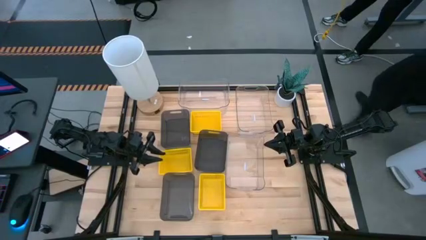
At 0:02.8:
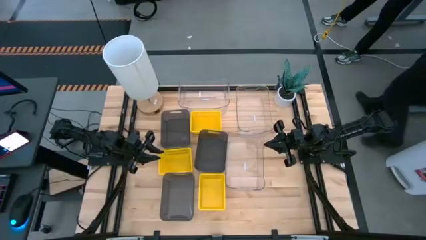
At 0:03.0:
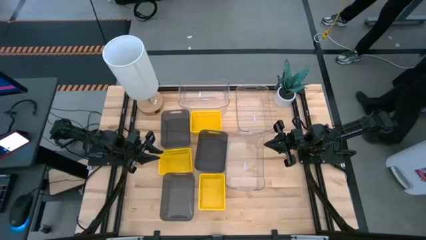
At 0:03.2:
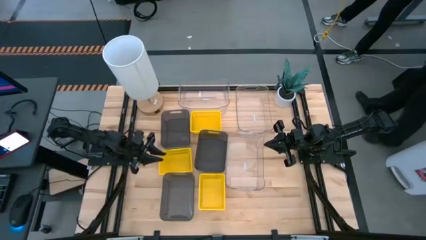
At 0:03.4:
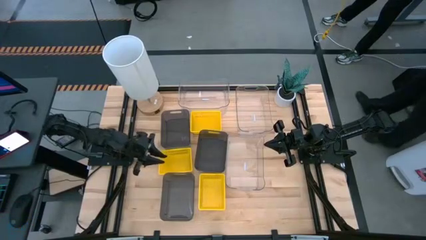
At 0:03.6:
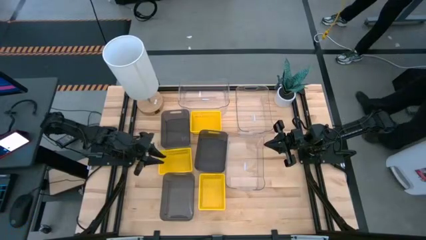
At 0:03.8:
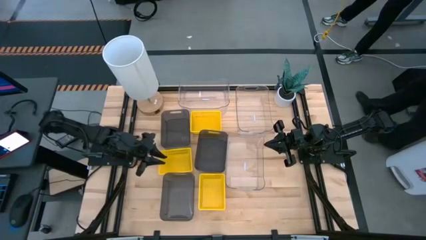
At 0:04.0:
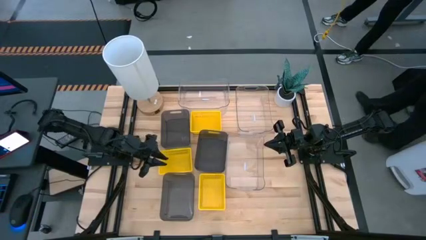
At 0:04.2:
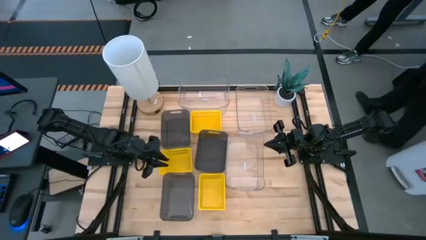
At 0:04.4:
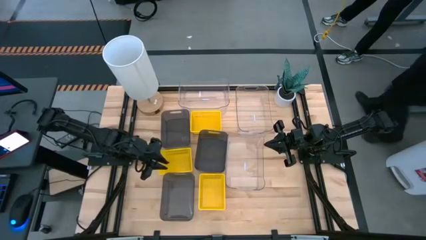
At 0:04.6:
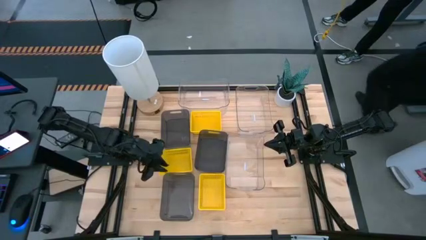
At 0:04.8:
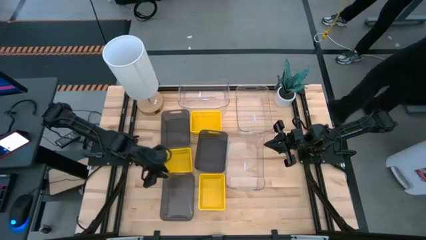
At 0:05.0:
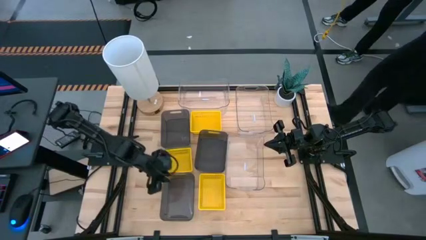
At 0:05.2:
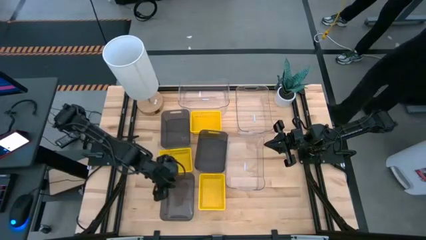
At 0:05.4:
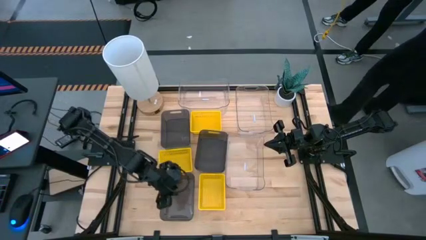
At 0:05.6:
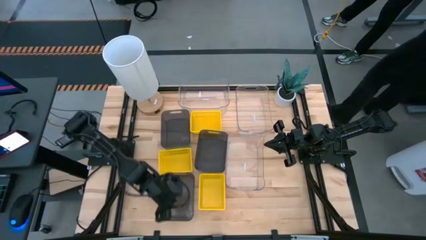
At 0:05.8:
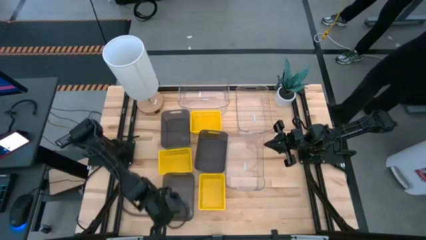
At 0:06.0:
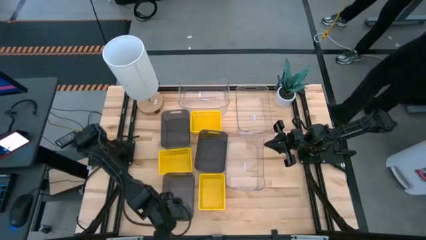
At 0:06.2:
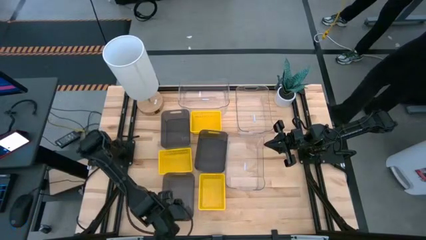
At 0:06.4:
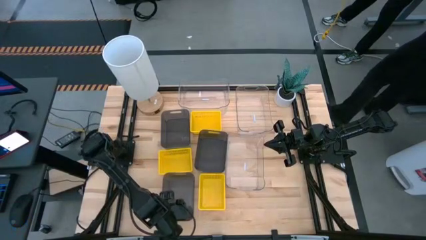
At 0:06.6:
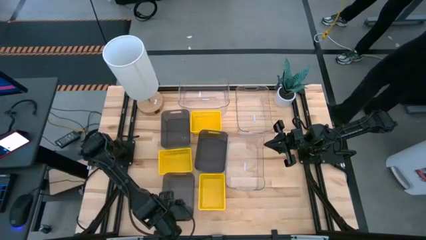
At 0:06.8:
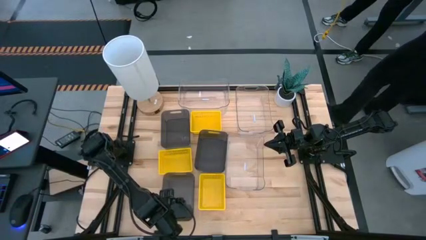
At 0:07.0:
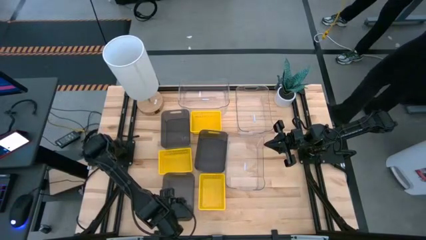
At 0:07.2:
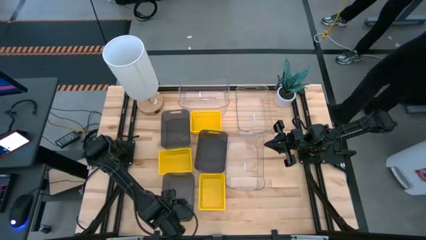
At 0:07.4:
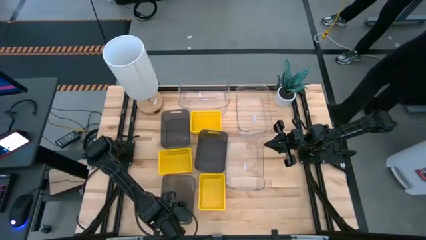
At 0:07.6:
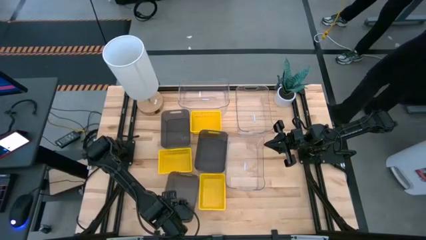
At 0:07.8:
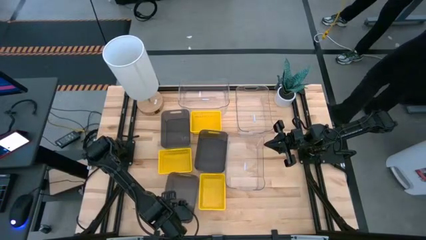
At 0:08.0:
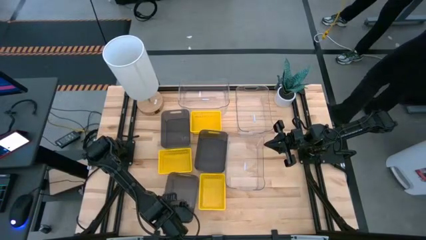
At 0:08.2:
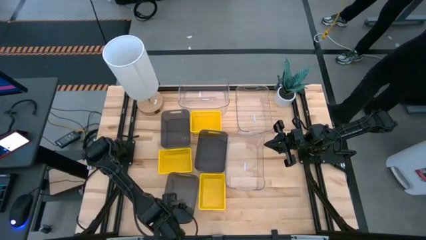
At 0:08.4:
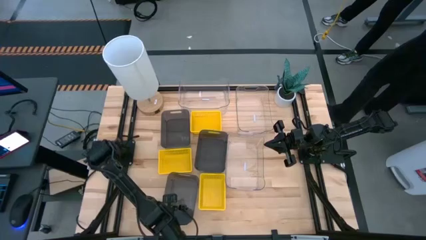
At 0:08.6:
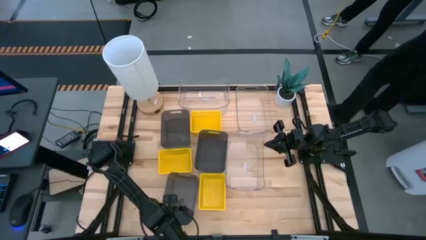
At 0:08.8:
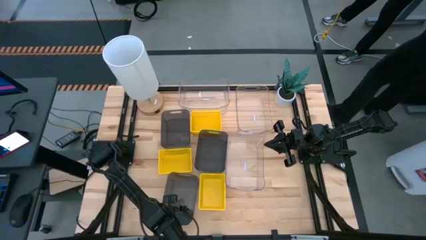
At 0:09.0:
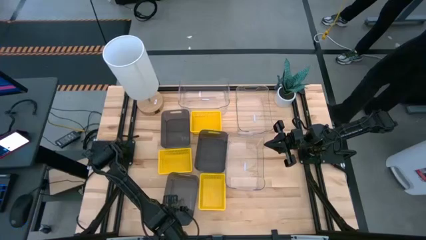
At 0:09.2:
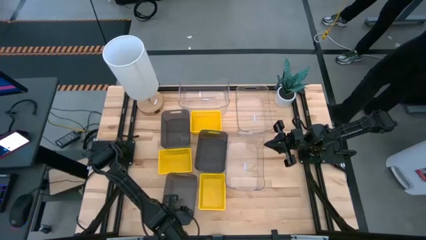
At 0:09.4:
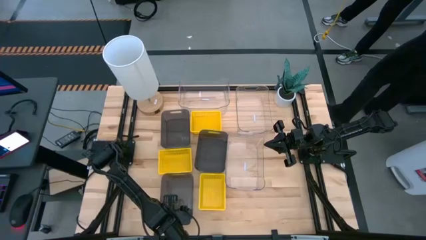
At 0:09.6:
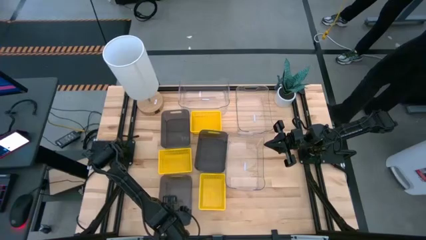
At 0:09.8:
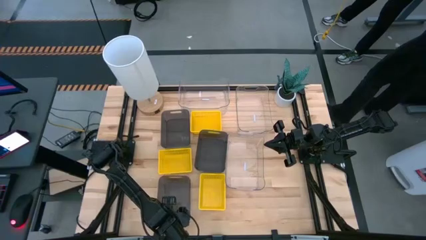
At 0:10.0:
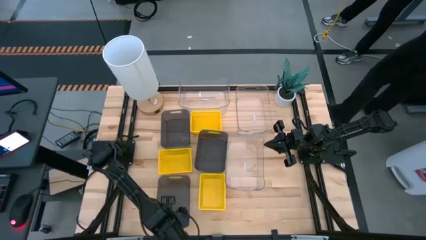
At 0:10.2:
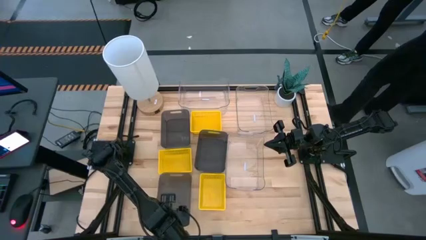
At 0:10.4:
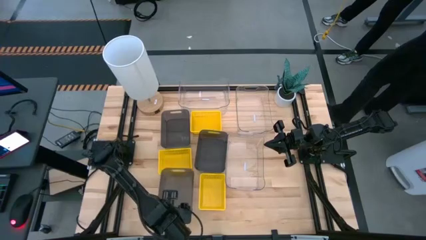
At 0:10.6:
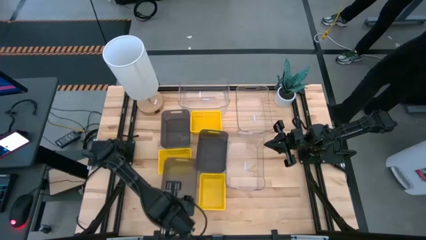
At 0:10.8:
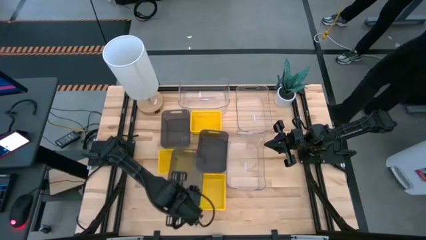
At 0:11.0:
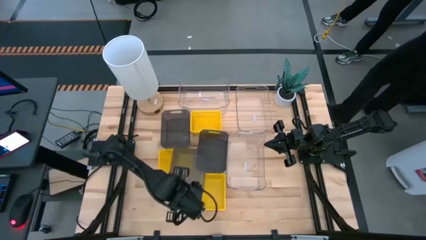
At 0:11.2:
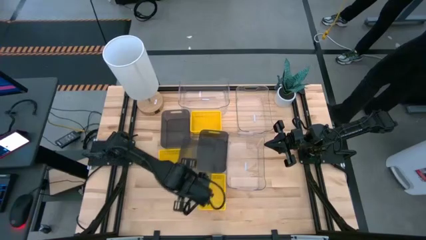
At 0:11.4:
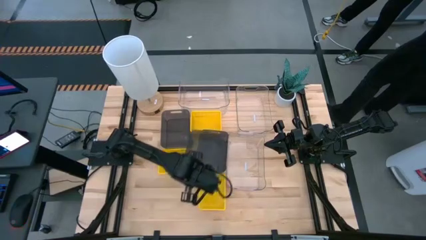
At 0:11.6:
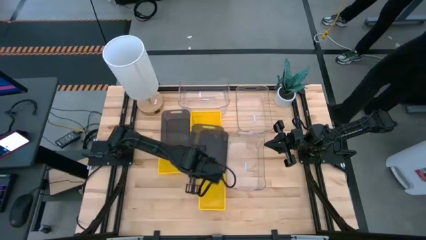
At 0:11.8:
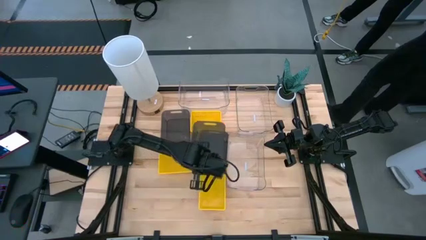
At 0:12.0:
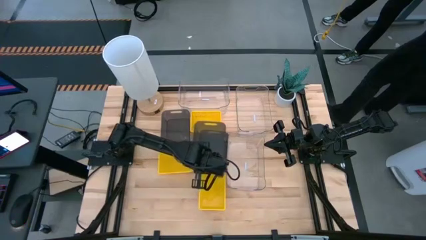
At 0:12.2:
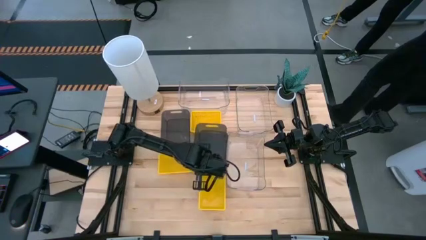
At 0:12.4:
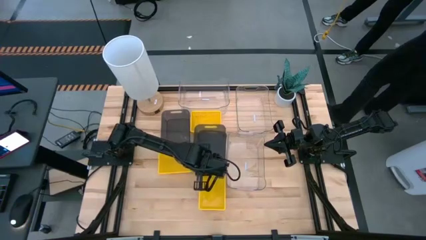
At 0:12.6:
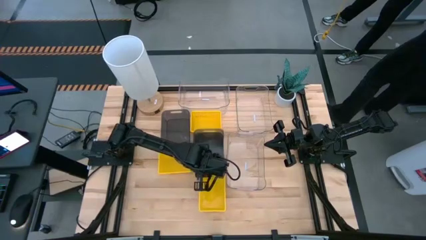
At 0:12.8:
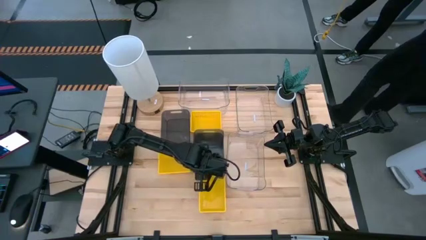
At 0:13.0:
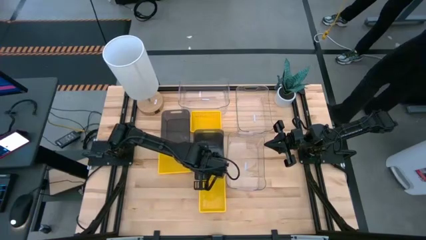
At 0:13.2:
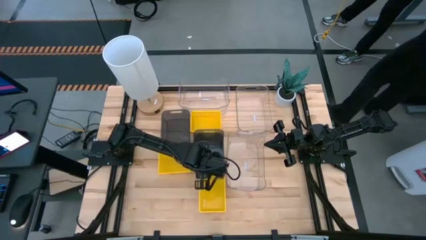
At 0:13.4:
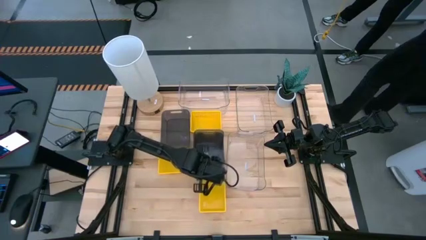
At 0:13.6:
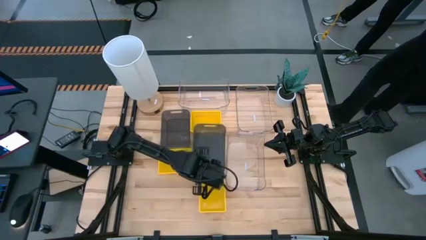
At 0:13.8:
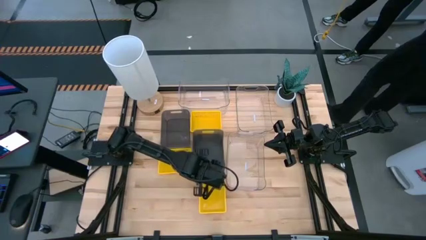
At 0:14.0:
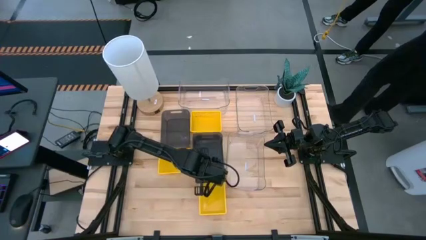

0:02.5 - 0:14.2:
Stack the bottom transparent black bin on top of the left transparent black bin
